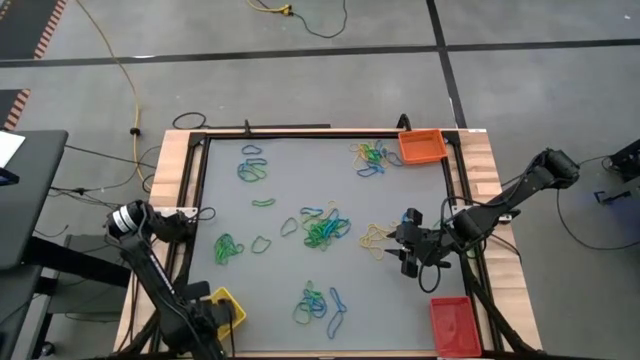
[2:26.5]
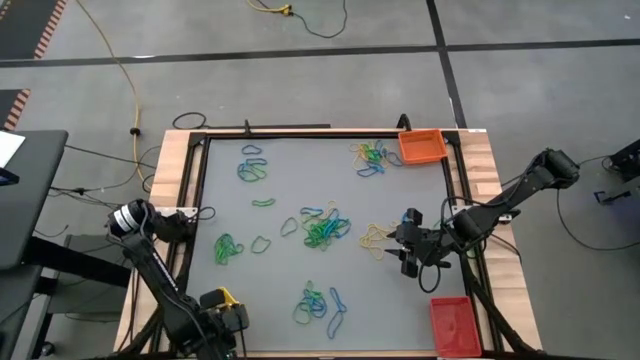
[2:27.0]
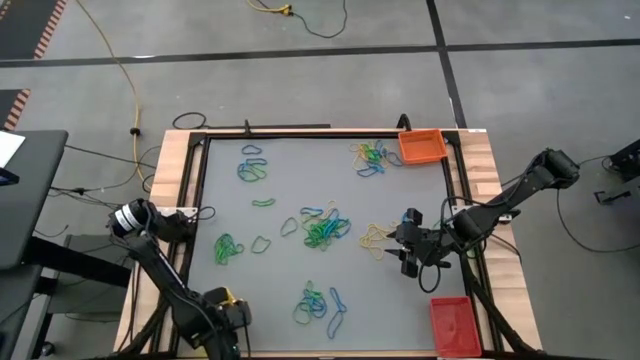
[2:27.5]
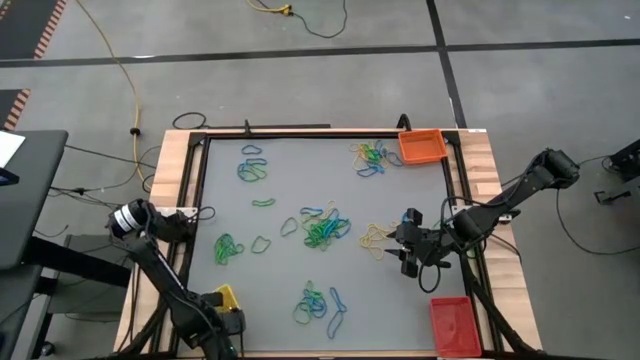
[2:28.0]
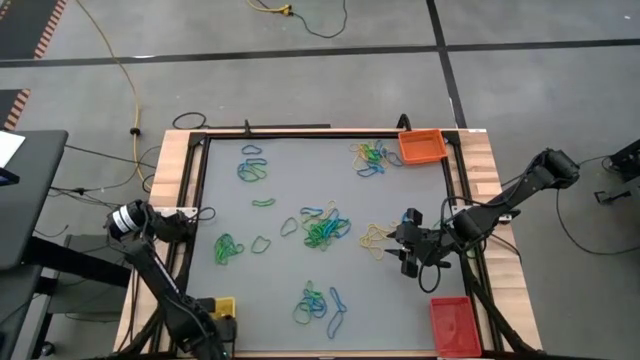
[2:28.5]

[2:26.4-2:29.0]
Task: Sort rubber bands into baskets
Adjust the yellow bin

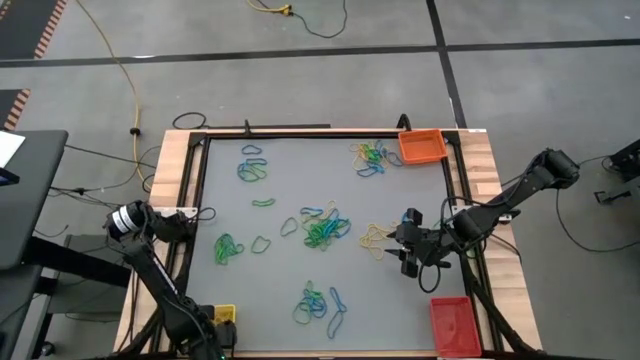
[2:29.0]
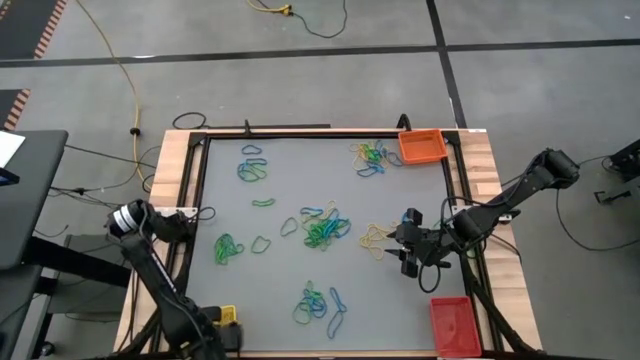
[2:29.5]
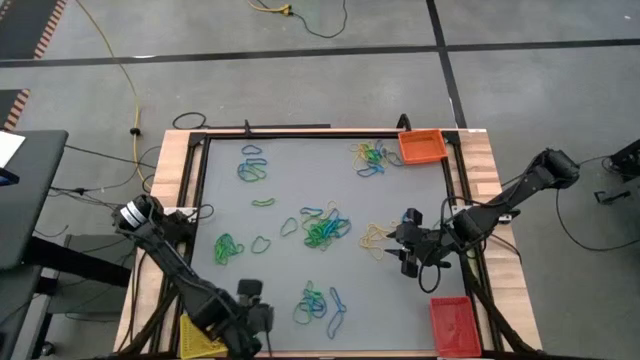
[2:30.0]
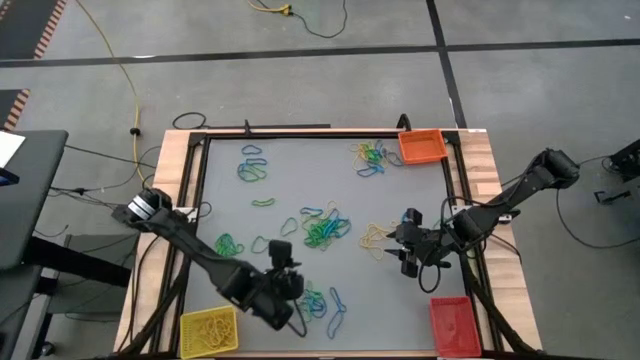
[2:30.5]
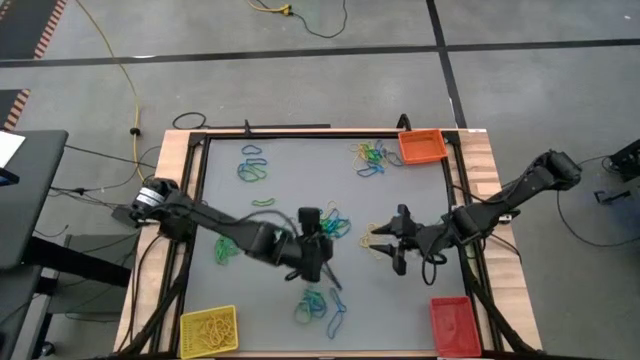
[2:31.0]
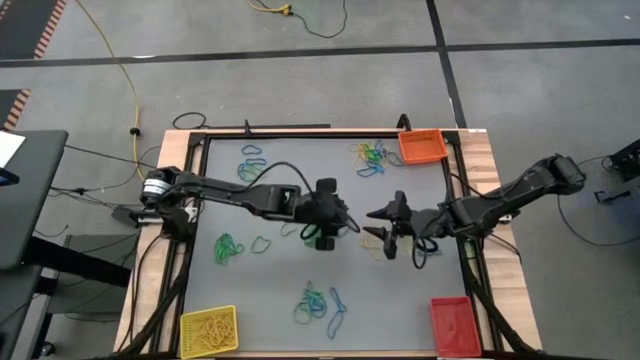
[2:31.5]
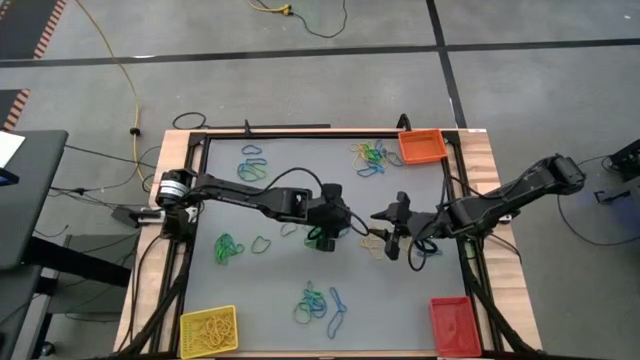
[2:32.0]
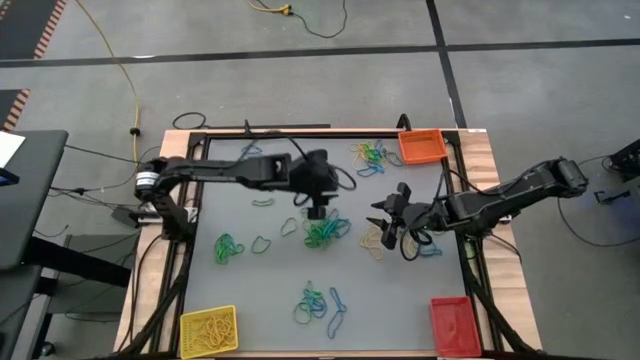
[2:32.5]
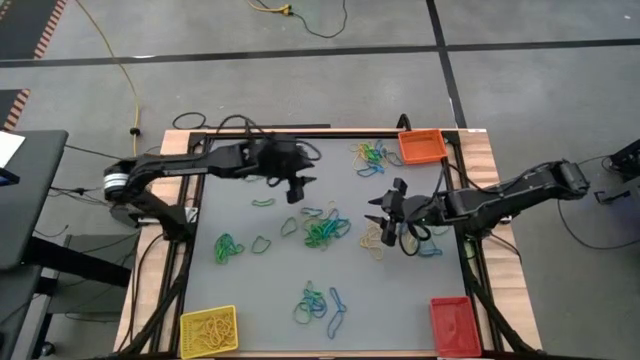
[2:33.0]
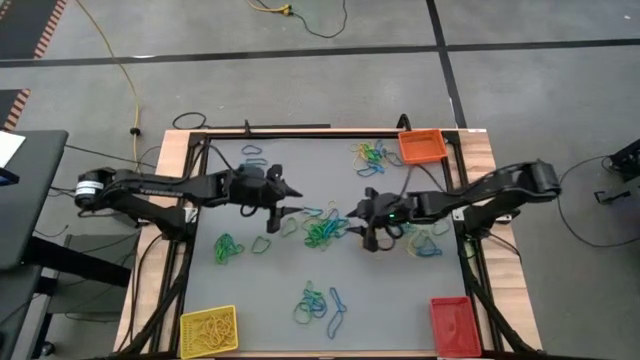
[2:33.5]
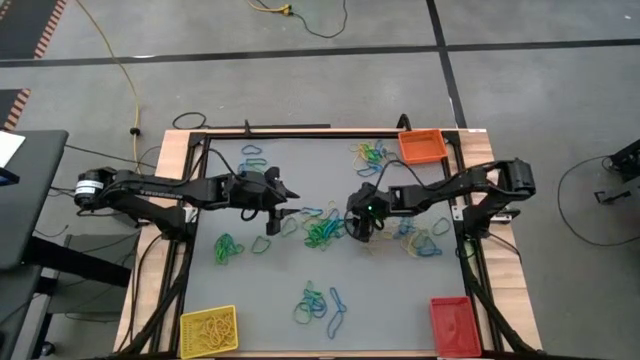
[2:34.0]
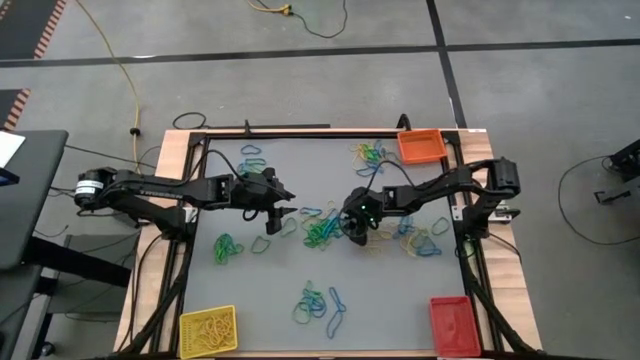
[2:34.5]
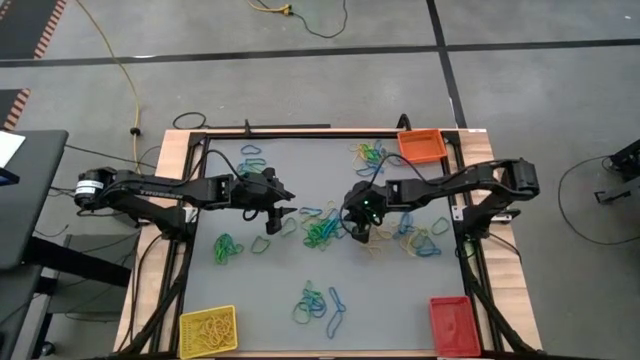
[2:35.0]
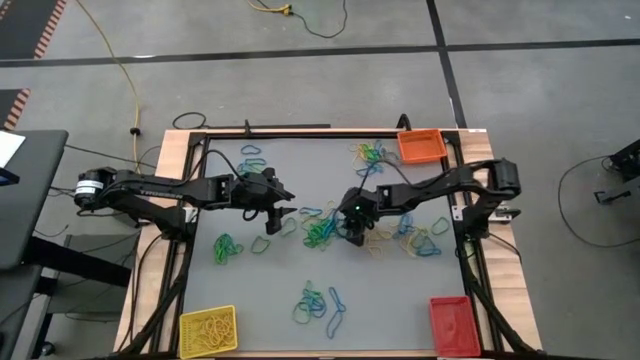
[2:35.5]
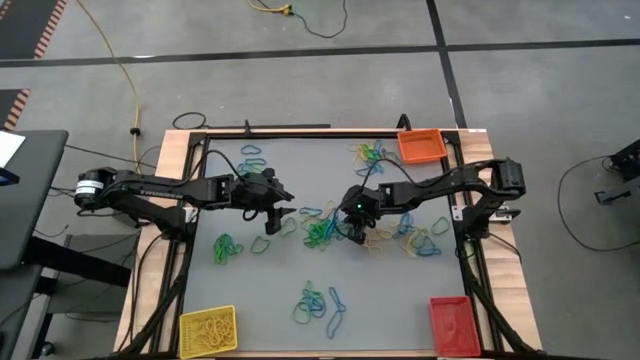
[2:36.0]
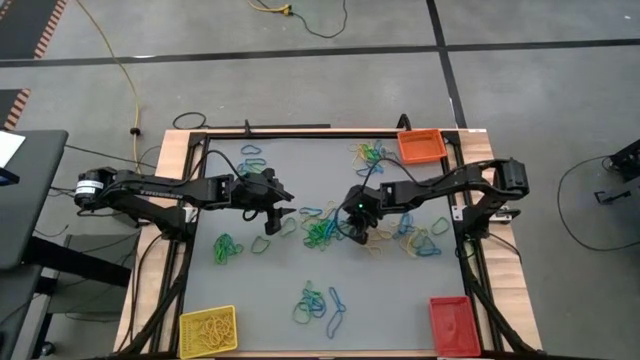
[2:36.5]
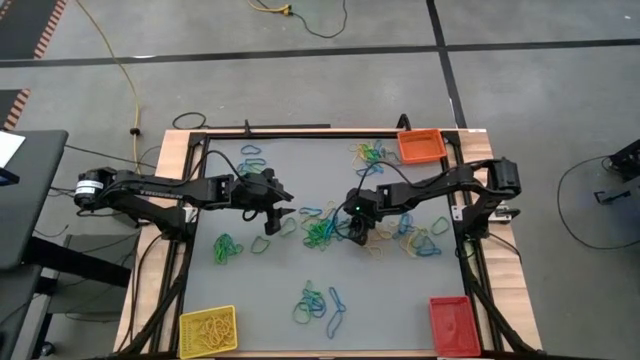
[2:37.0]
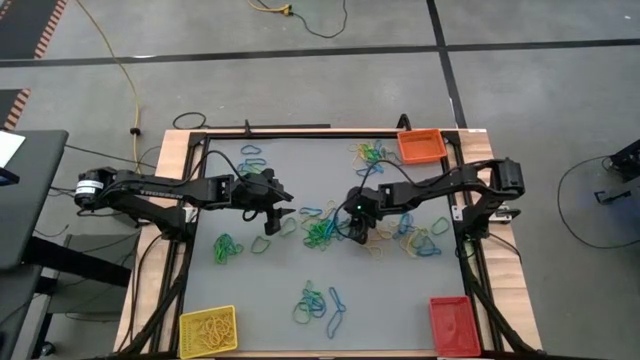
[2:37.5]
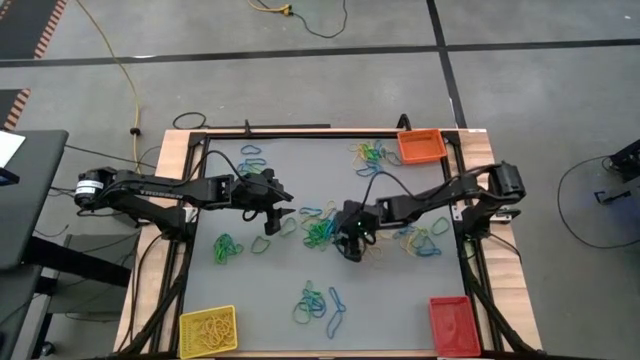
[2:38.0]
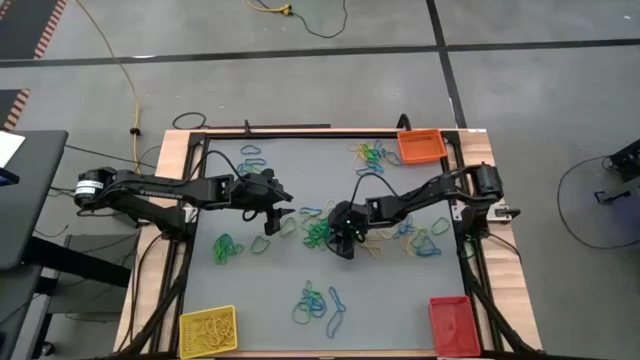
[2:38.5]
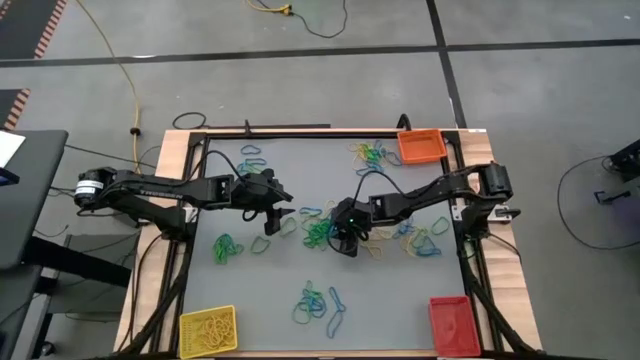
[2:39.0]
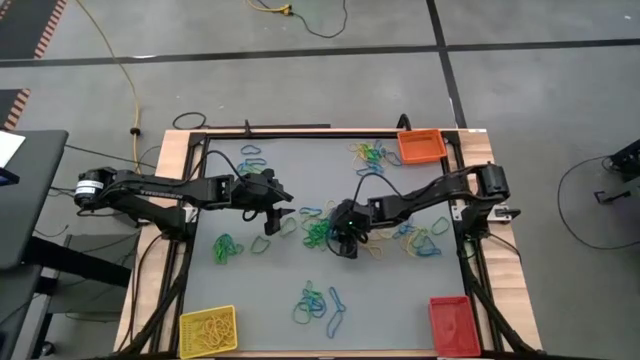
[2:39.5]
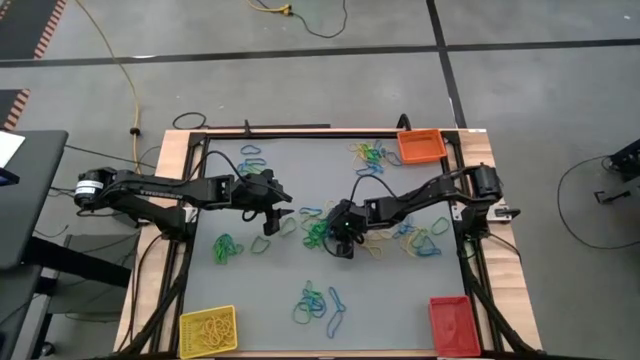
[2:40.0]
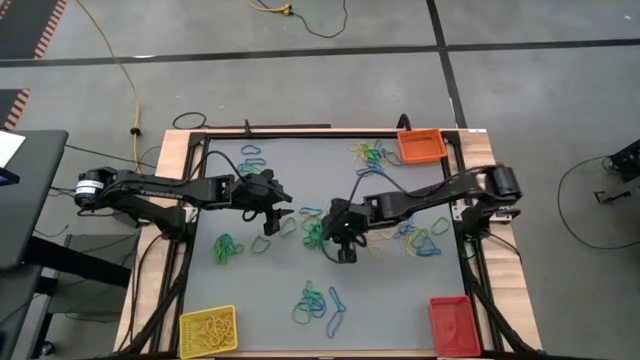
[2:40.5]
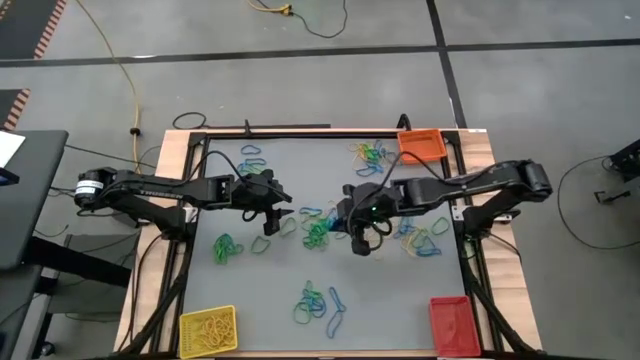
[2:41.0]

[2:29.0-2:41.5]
Put the green rubber band into the orange bin

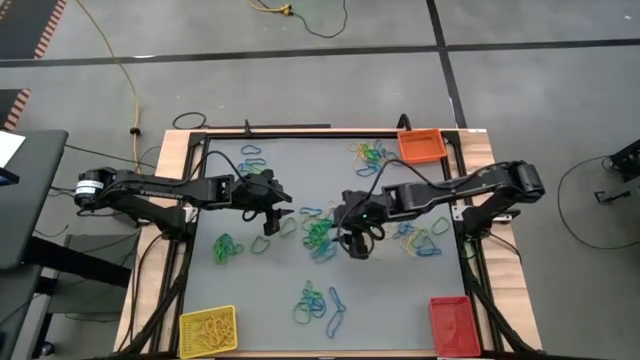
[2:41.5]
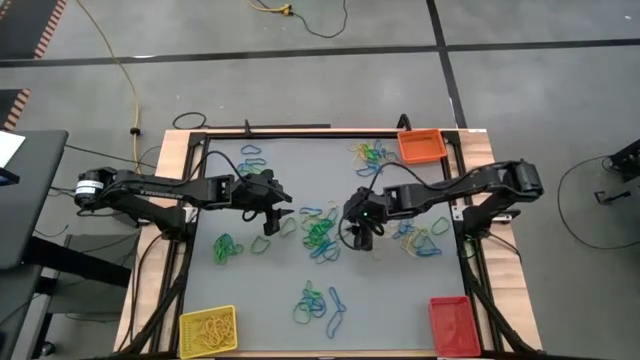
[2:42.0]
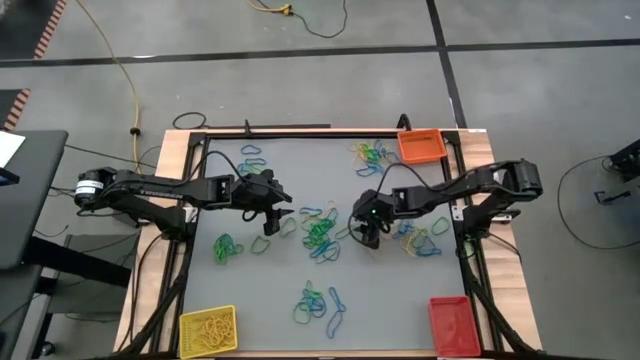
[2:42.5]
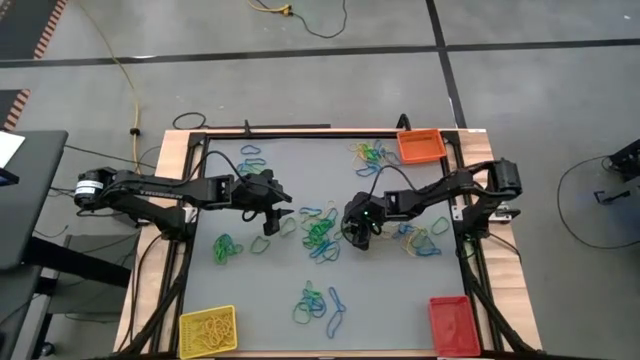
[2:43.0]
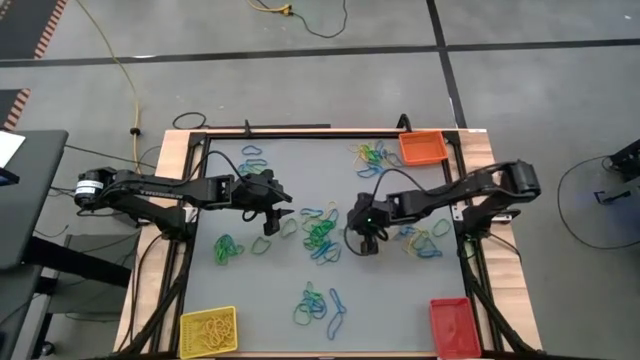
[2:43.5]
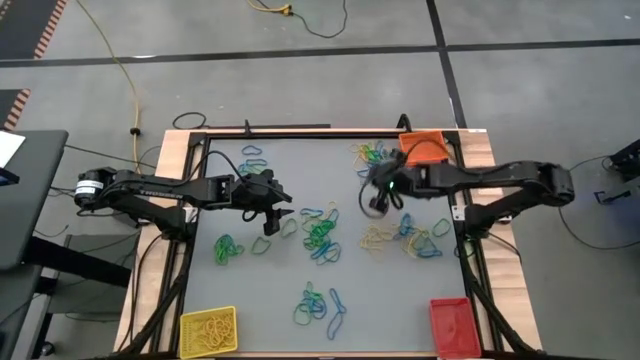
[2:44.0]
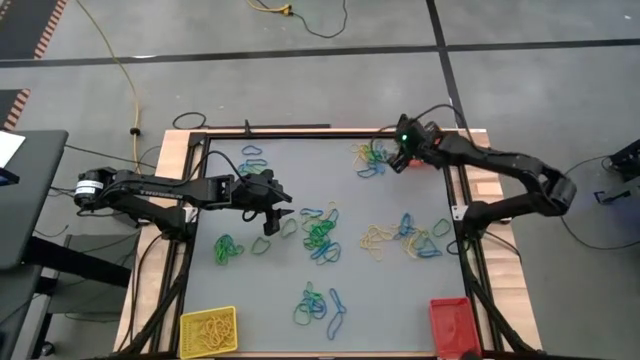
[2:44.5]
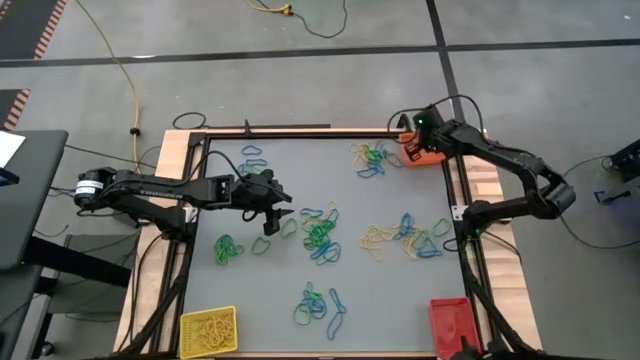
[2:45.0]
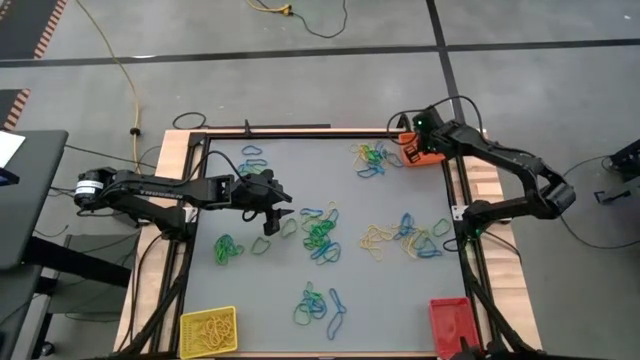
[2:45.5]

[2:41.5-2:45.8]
Put the green rubber band into the orange bin

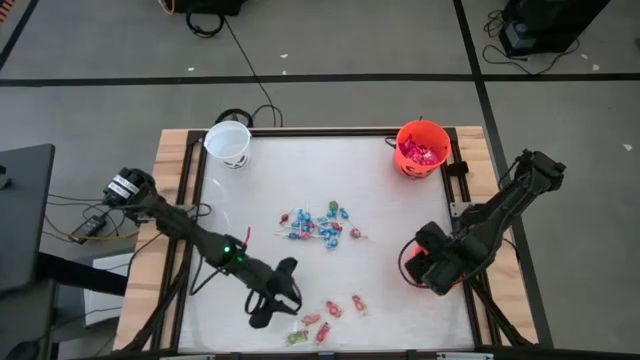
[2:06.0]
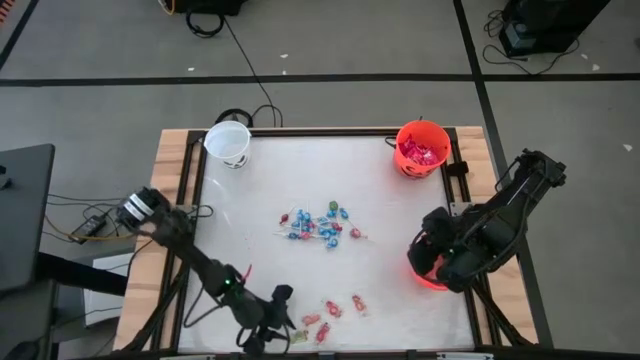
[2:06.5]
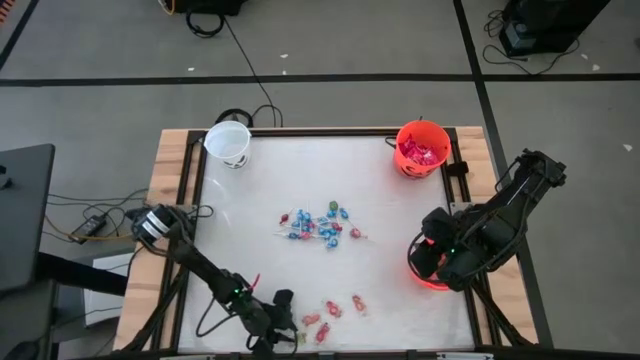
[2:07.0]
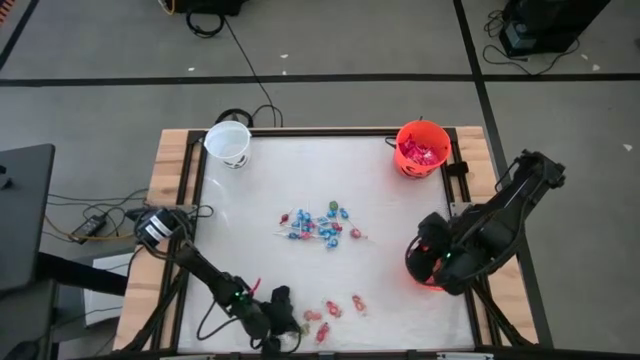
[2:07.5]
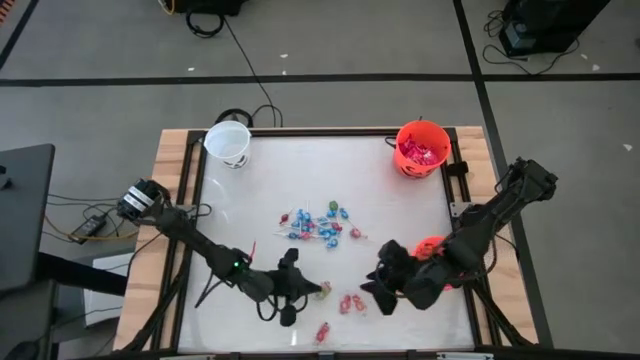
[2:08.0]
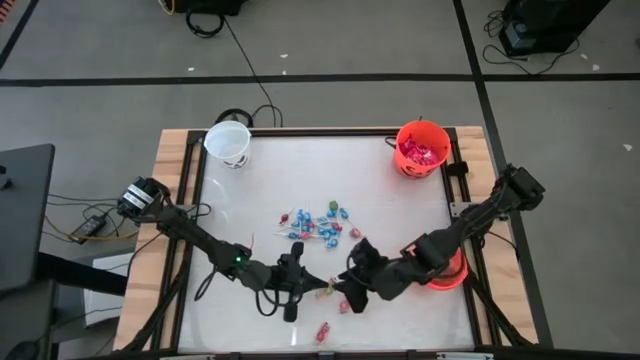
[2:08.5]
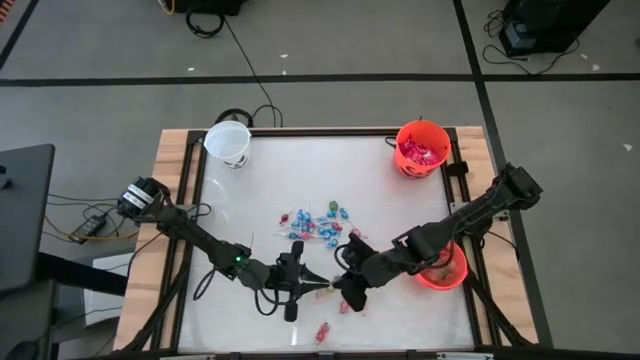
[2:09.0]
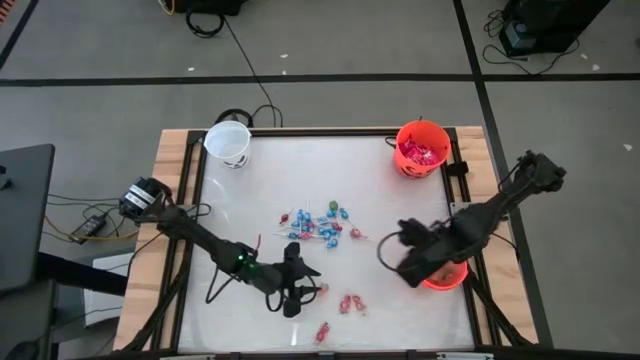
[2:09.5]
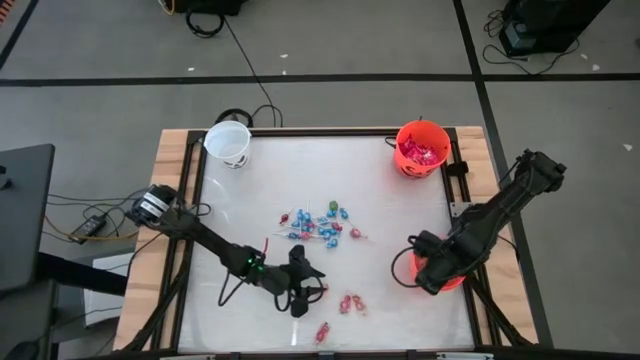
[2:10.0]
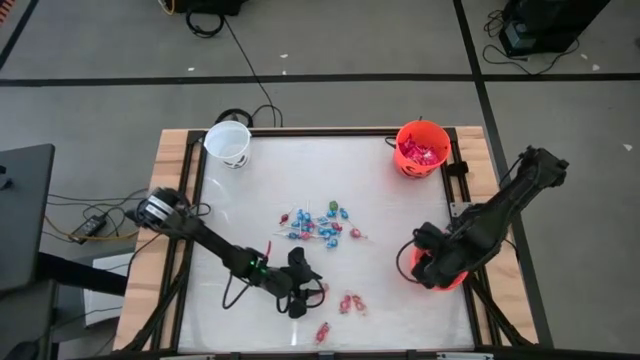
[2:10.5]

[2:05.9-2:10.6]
Task: Sort candy by brand, put in halloween buckets
Put the green gummy into the bottom orange bucket
